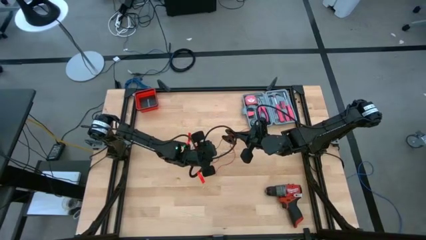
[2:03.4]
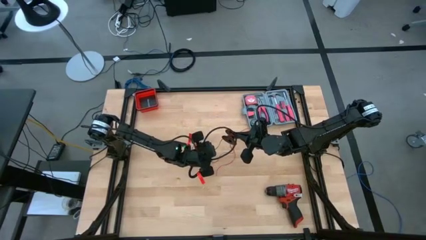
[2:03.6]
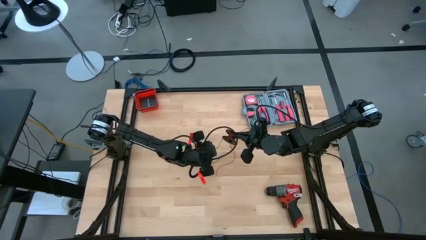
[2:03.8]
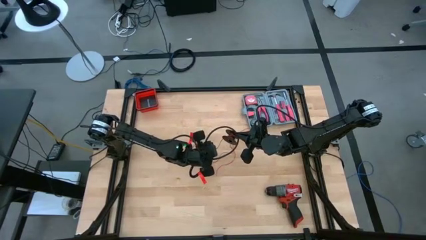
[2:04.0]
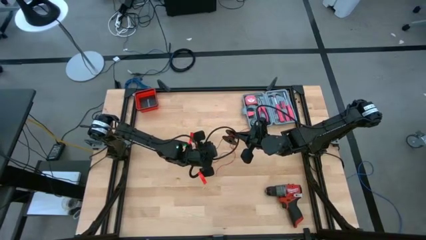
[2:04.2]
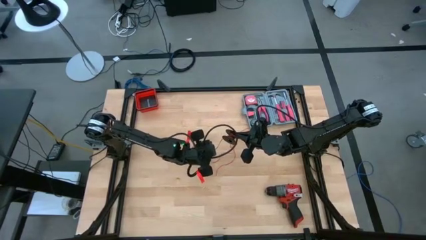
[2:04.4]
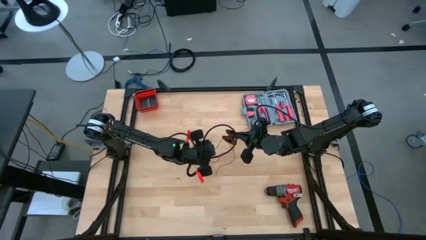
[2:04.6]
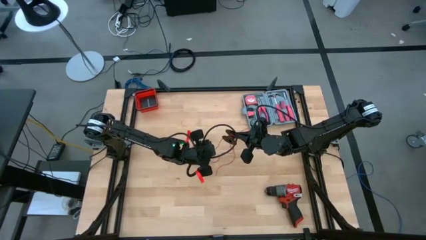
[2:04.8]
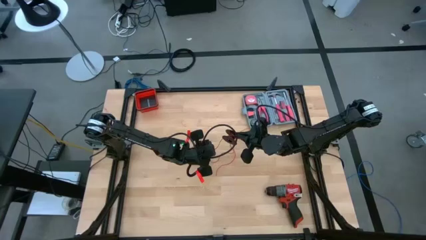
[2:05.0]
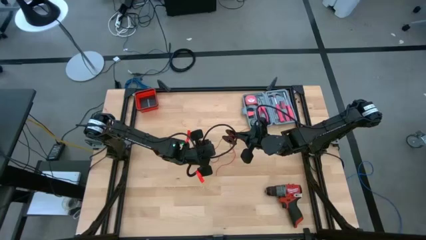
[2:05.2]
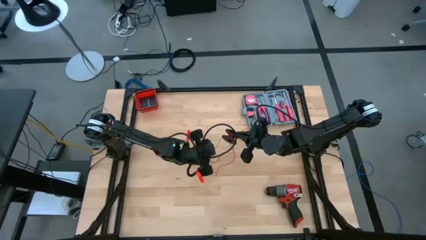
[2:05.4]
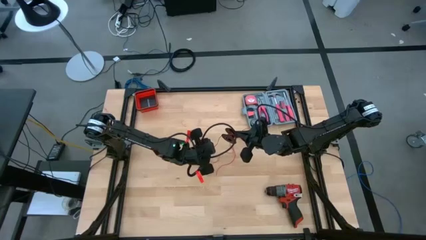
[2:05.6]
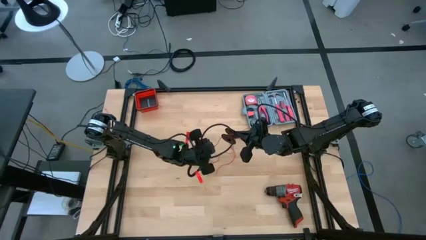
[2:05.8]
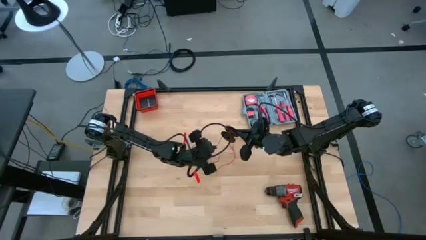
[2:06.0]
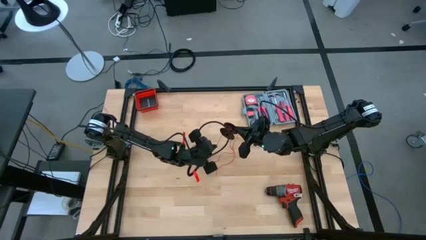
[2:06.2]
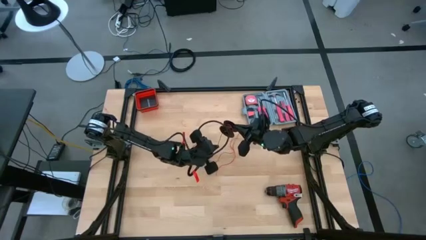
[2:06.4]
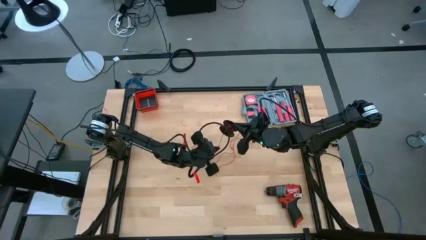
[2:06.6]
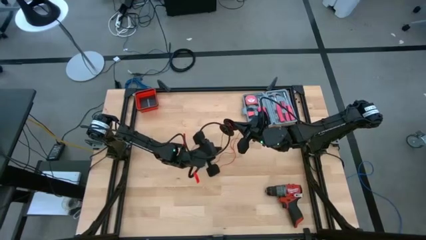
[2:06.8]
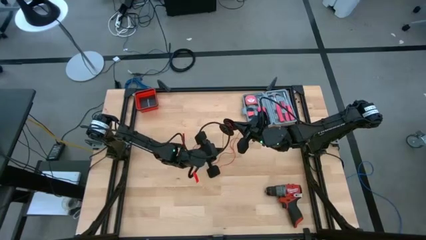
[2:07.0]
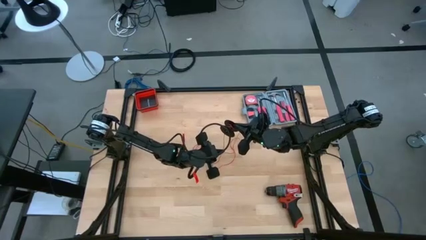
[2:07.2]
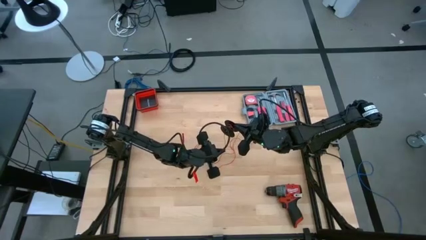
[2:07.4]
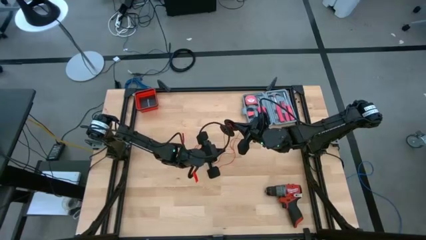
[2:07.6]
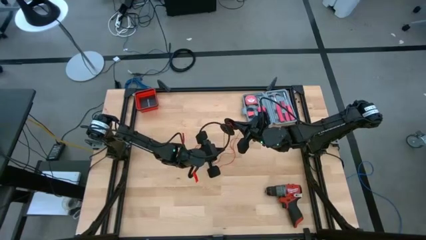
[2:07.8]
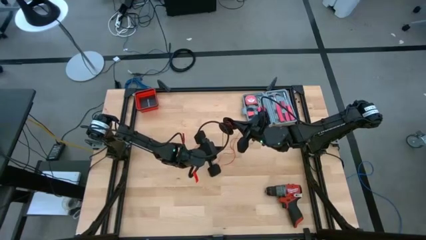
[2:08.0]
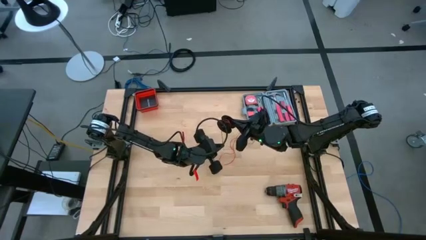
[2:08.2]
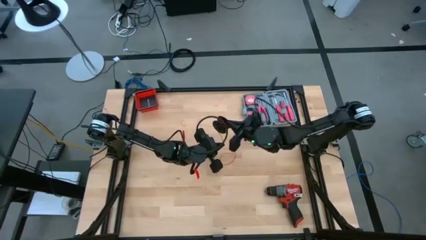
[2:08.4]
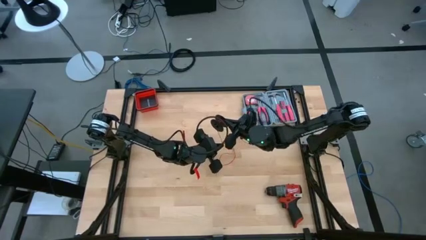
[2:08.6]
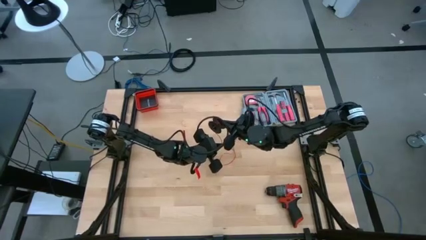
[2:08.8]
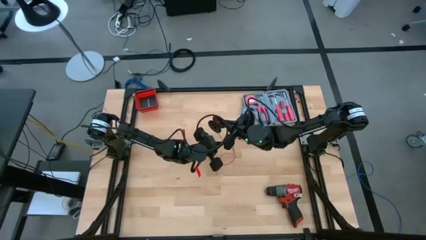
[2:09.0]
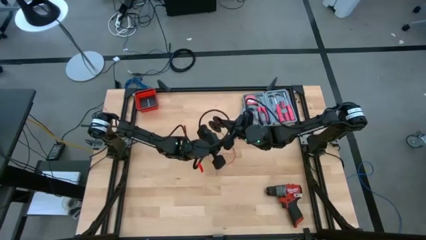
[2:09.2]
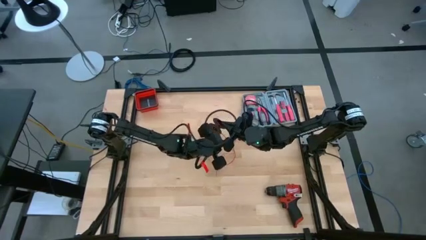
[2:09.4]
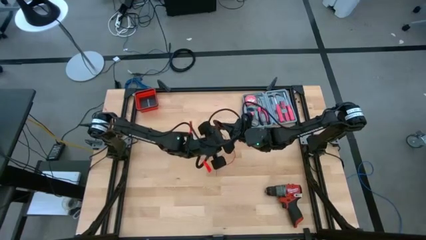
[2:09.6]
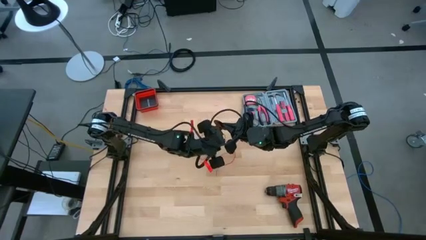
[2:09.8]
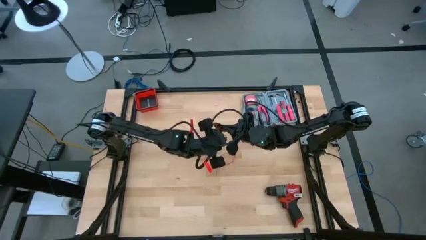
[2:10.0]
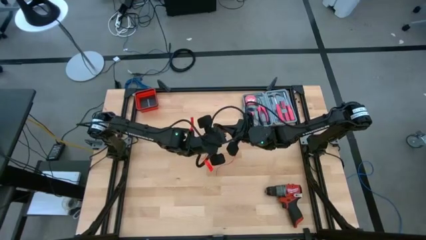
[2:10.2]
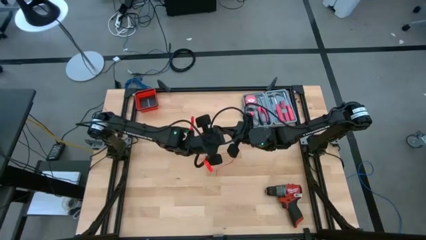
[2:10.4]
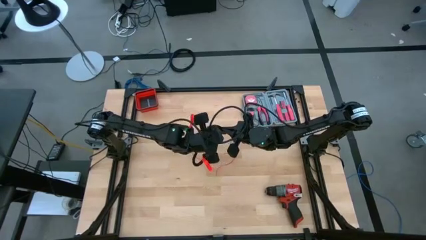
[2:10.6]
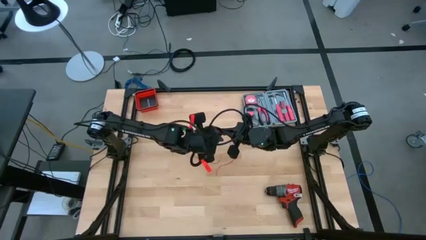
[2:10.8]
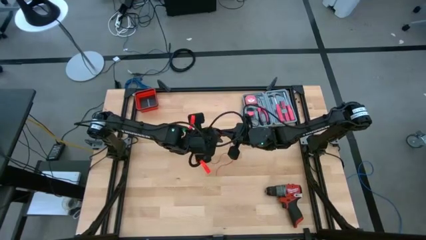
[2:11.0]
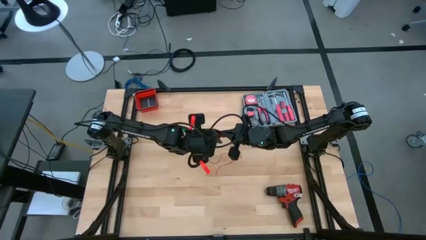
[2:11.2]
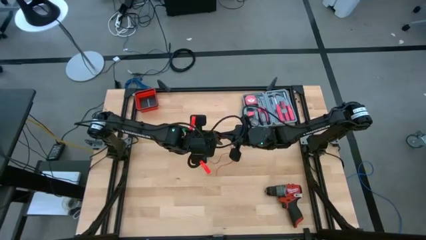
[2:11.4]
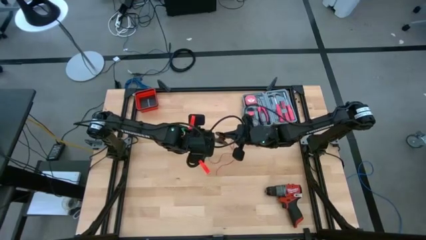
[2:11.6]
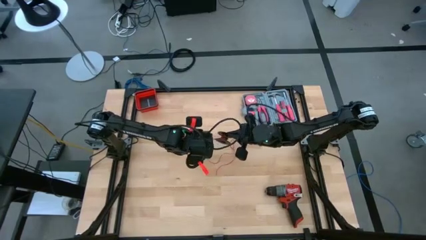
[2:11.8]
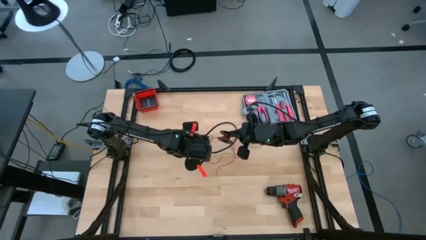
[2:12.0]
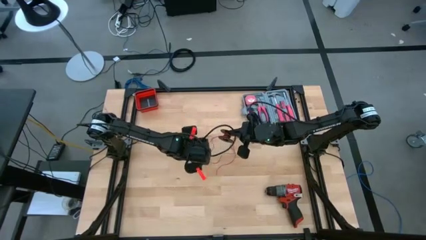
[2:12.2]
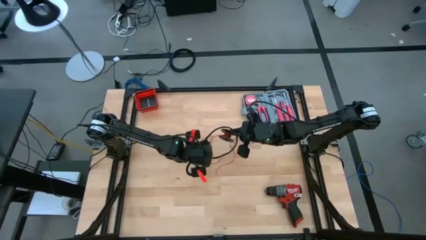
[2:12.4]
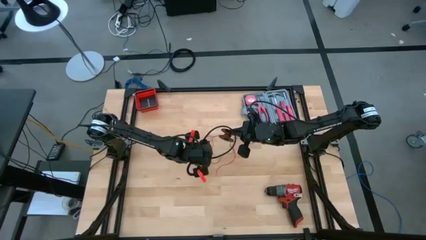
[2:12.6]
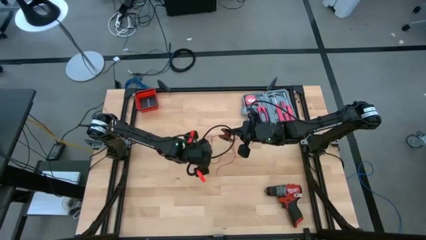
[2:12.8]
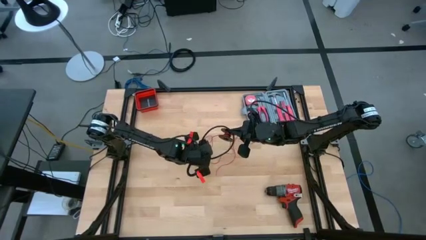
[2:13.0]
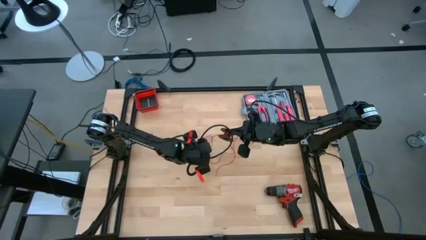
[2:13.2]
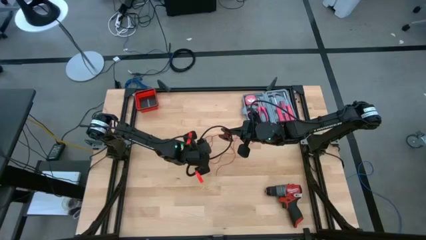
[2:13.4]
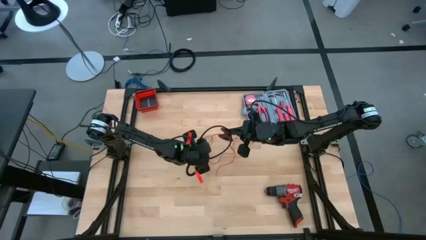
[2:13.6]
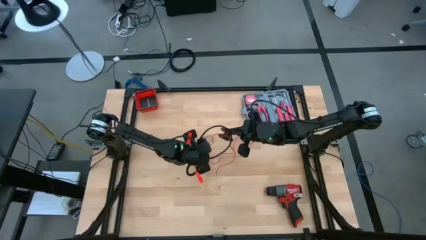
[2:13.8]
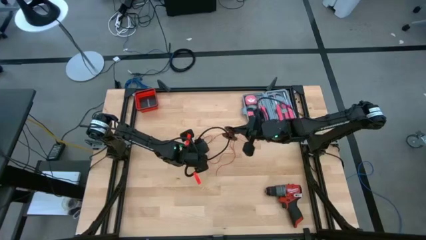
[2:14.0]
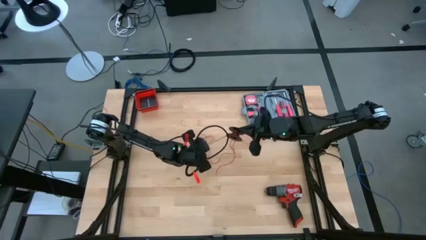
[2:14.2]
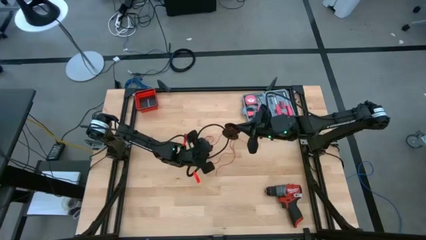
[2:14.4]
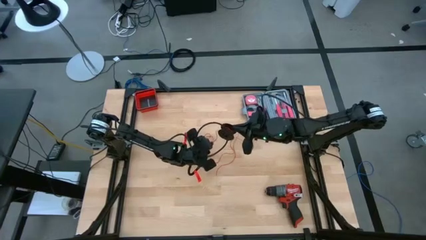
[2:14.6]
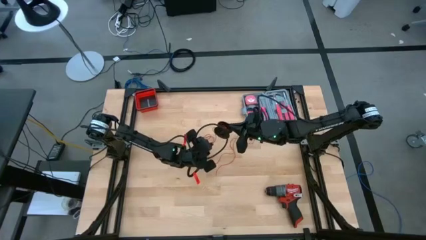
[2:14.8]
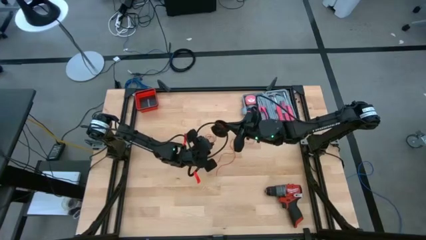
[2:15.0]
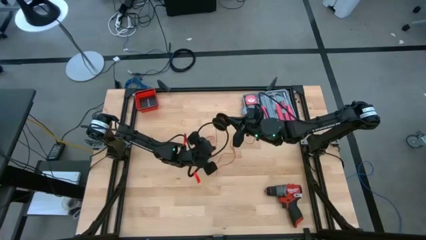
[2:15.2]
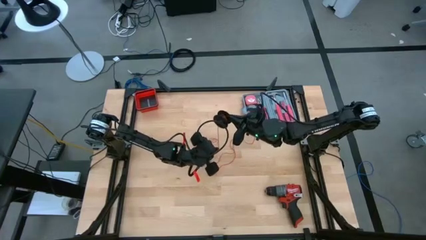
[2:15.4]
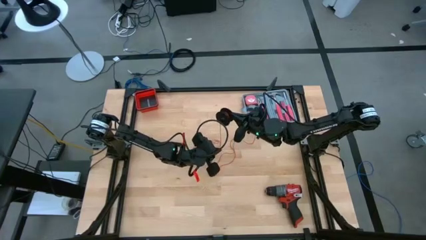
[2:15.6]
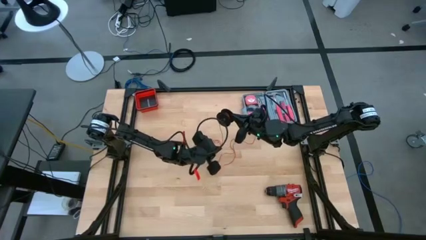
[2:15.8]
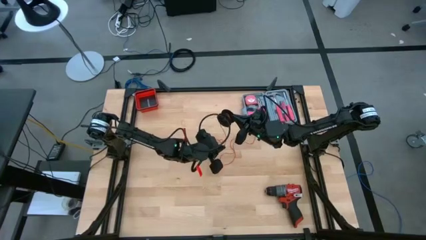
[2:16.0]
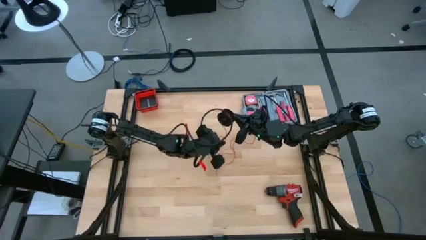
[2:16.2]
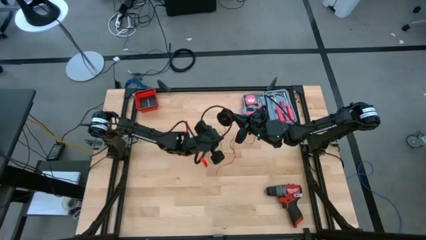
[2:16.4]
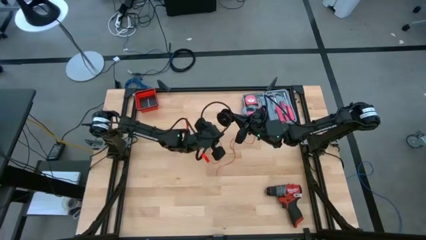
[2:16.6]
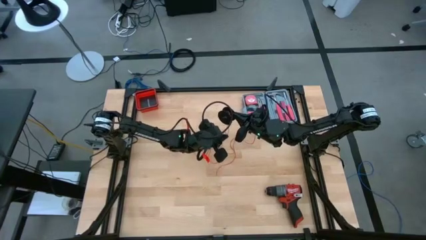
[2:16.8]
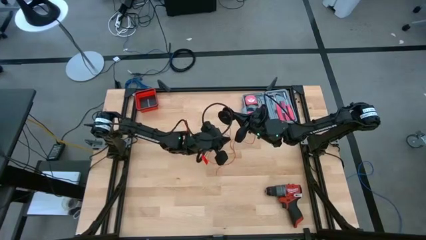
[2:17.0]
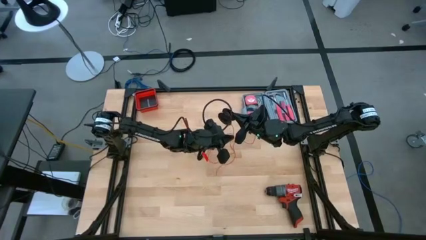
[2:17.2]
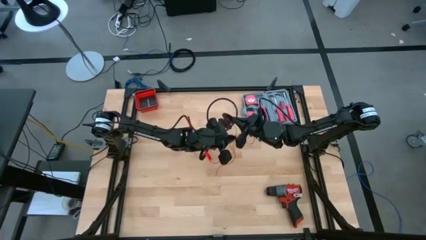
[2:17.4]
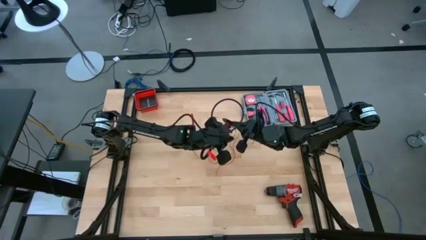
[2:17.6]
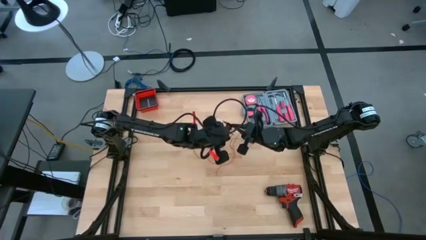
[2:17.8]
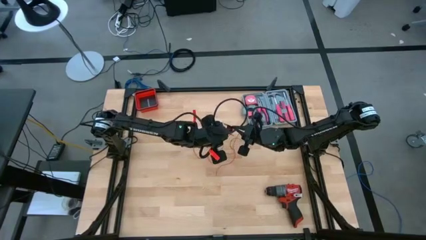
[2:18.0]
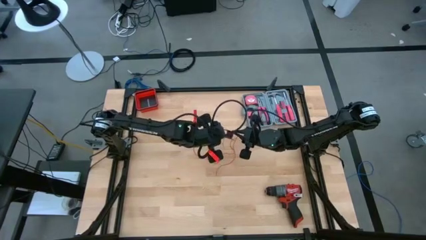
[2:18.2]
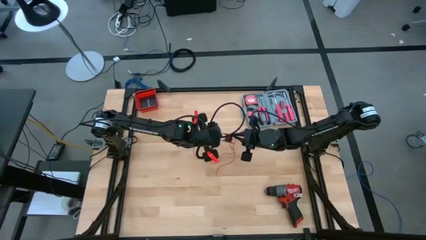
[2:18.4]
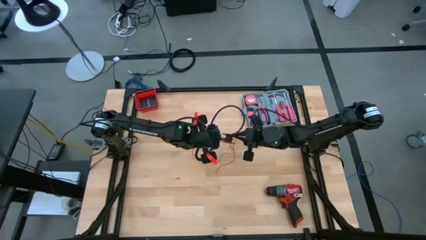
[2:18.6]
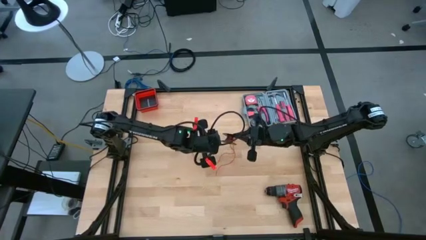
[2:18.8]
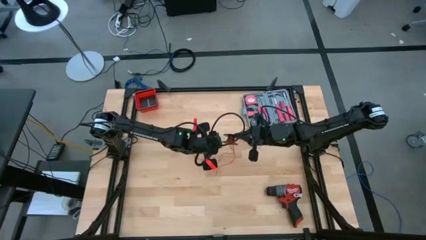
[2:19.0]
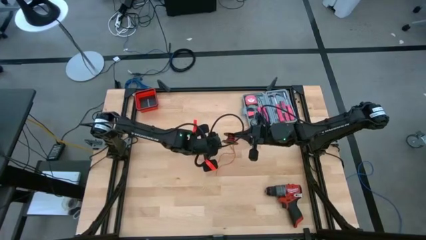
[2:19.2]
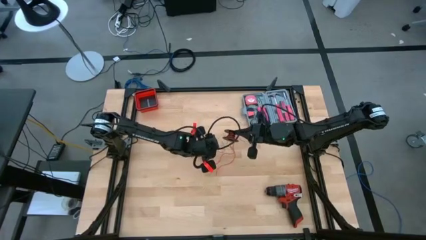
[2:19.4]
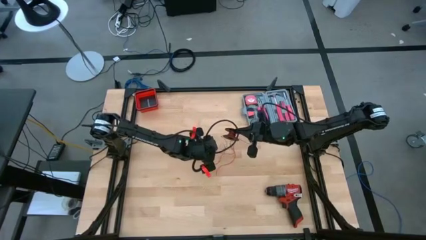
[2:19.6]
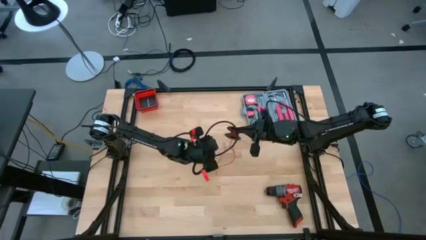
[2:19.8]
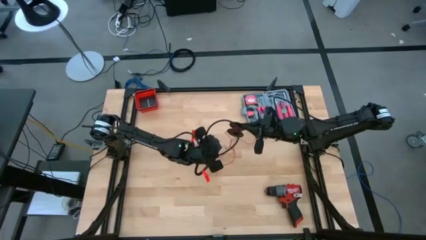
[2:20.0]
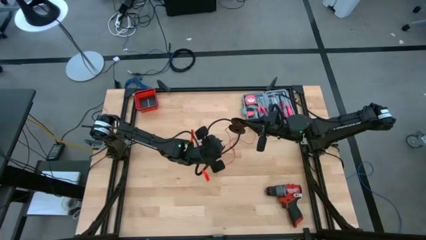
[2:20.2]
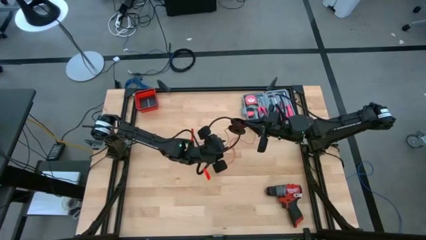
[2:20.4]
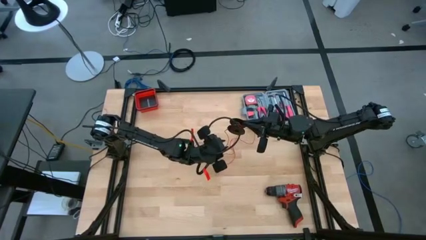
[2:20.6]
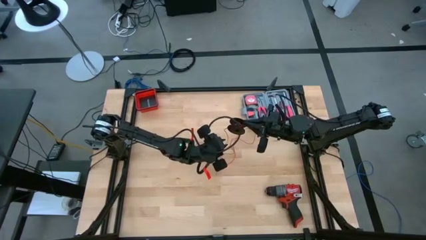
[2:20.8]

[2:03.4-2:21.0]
Task: Coil cords
Coil the red wire onto the black spool
